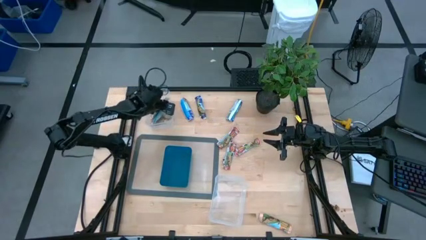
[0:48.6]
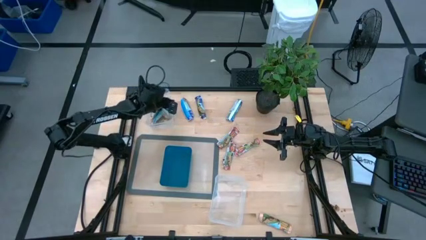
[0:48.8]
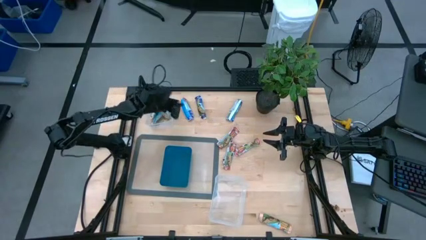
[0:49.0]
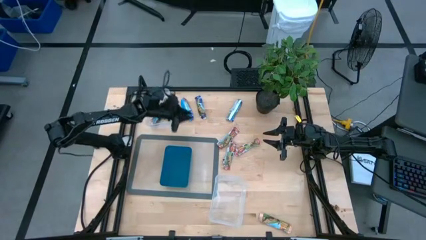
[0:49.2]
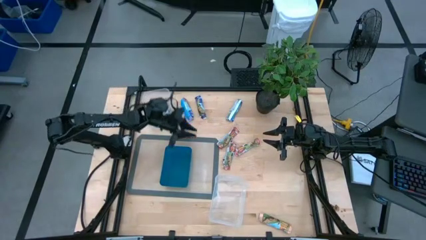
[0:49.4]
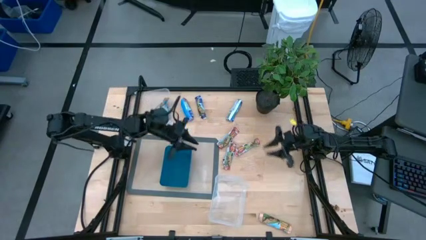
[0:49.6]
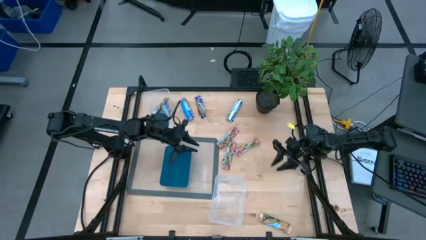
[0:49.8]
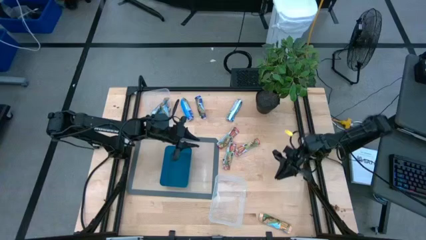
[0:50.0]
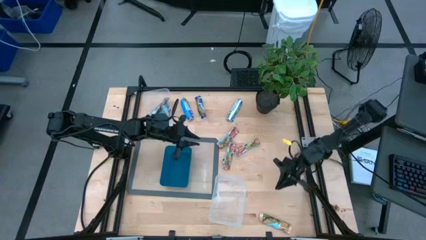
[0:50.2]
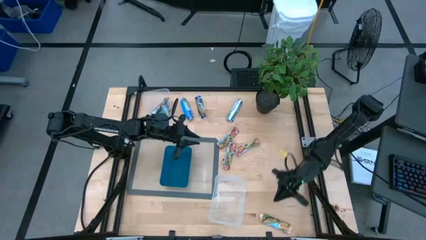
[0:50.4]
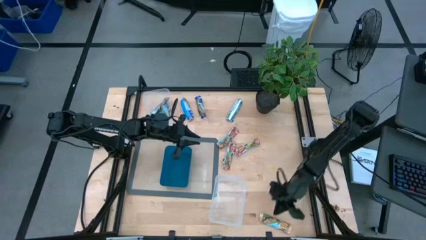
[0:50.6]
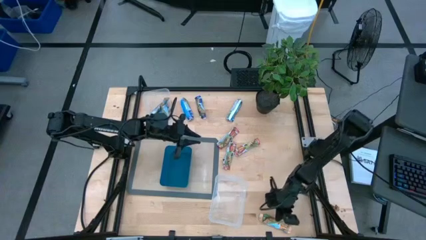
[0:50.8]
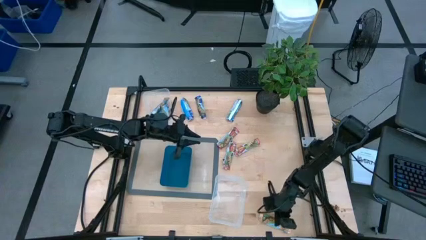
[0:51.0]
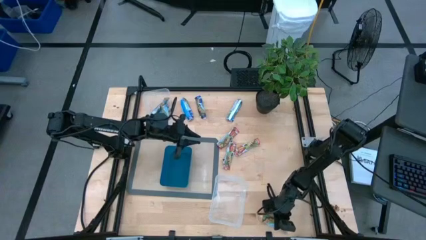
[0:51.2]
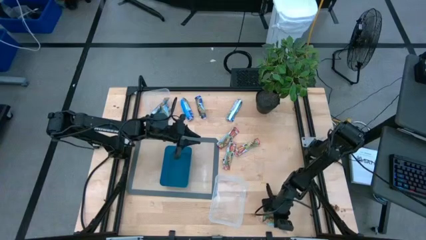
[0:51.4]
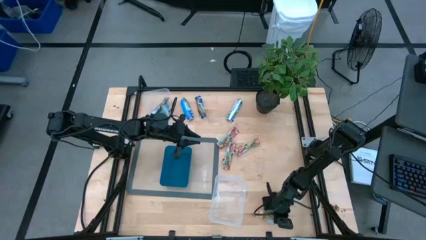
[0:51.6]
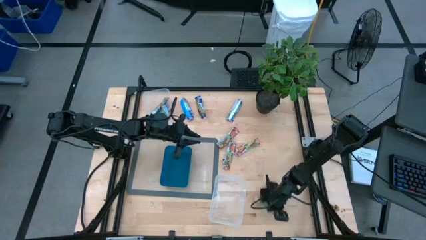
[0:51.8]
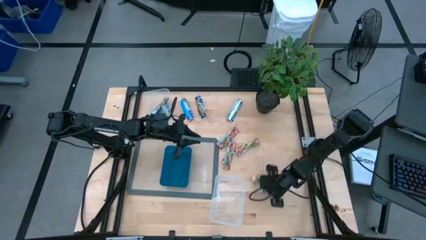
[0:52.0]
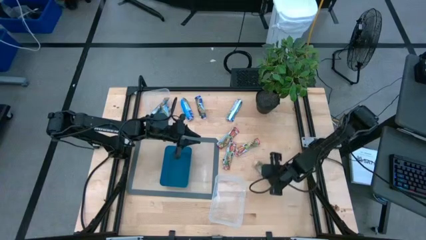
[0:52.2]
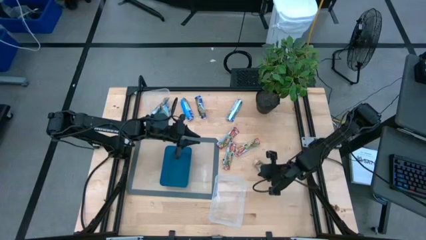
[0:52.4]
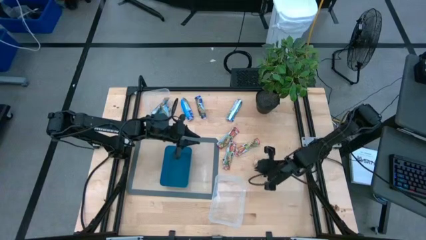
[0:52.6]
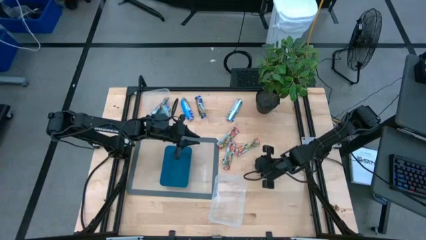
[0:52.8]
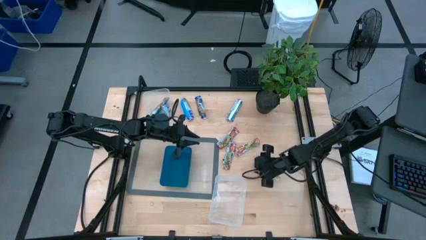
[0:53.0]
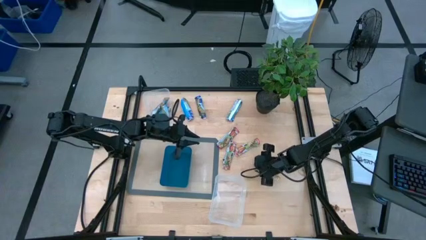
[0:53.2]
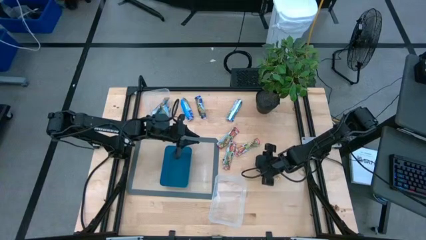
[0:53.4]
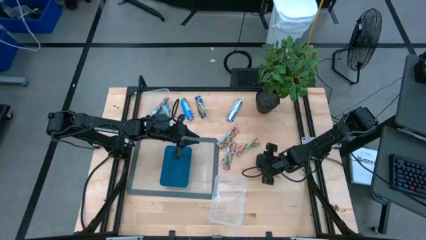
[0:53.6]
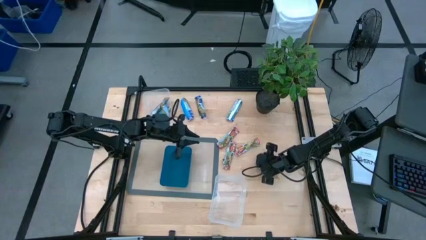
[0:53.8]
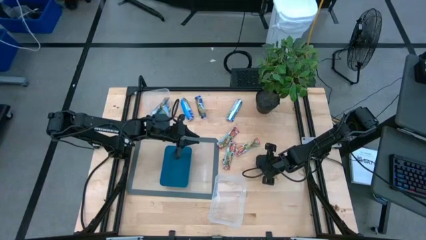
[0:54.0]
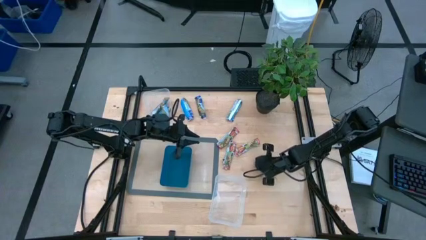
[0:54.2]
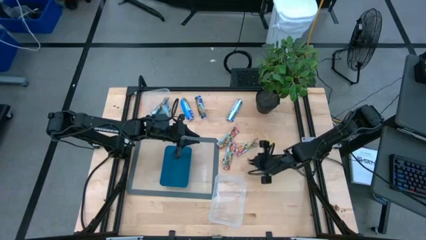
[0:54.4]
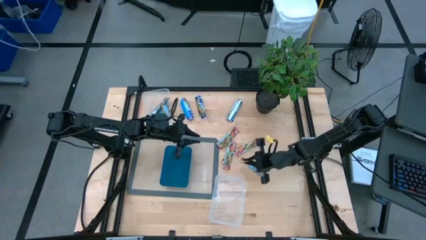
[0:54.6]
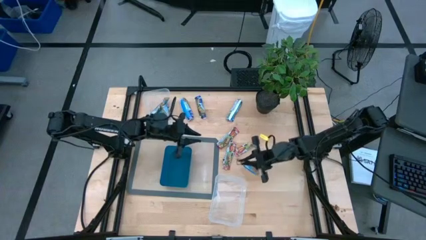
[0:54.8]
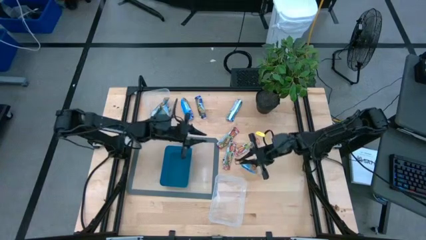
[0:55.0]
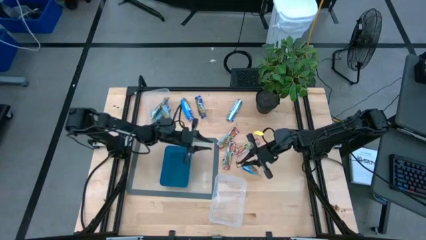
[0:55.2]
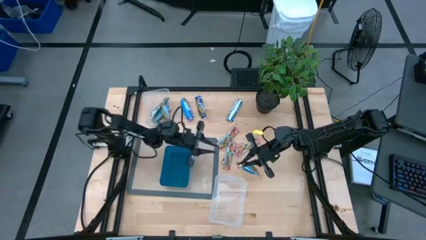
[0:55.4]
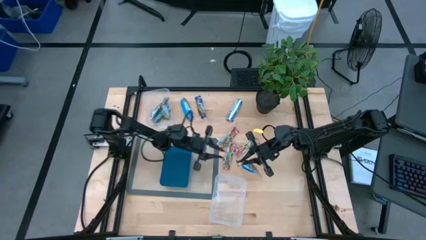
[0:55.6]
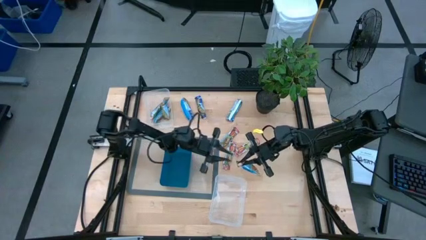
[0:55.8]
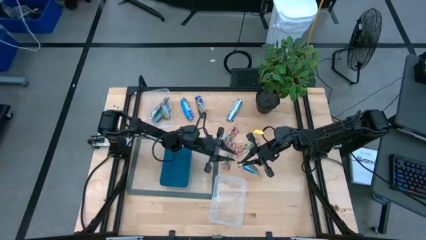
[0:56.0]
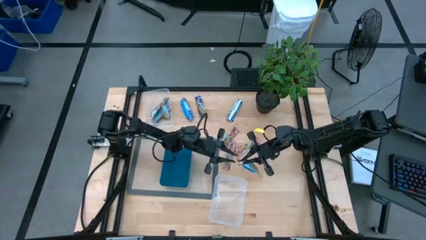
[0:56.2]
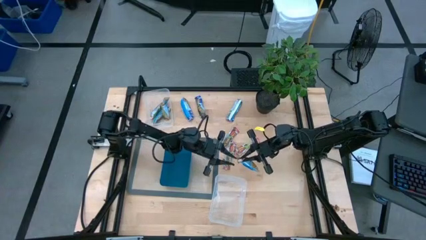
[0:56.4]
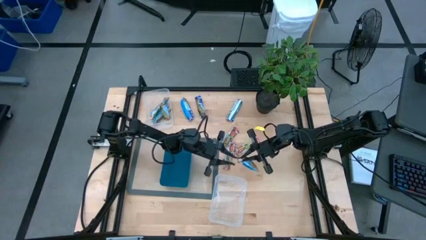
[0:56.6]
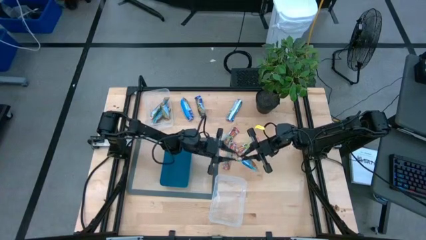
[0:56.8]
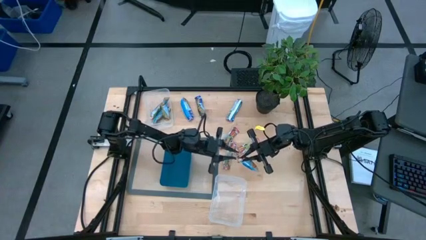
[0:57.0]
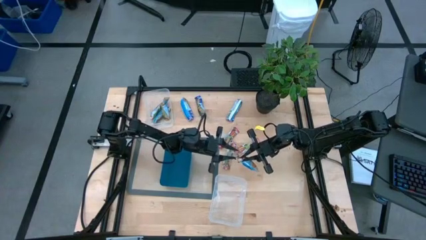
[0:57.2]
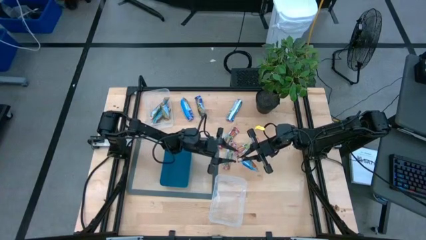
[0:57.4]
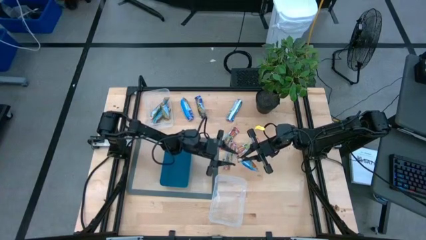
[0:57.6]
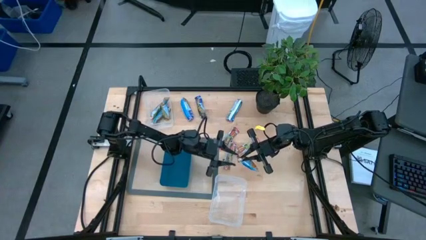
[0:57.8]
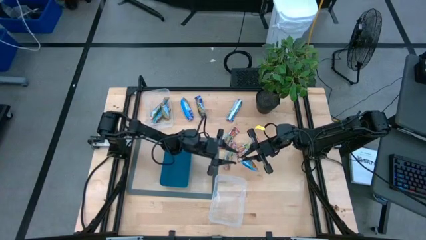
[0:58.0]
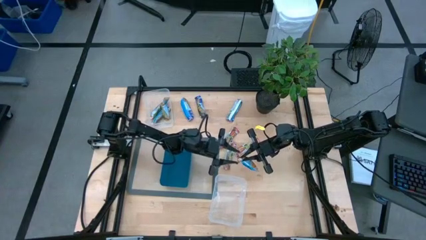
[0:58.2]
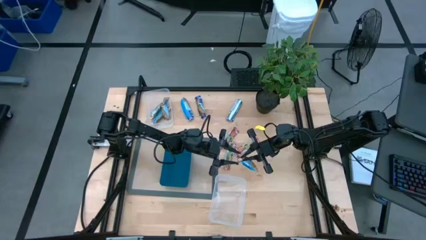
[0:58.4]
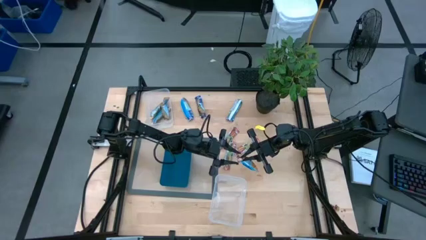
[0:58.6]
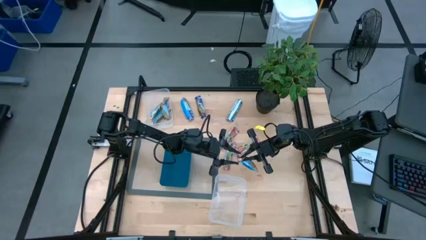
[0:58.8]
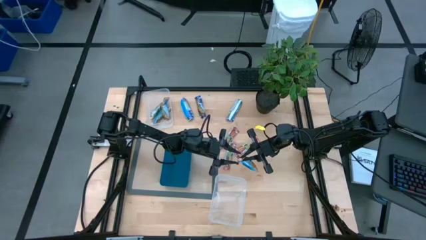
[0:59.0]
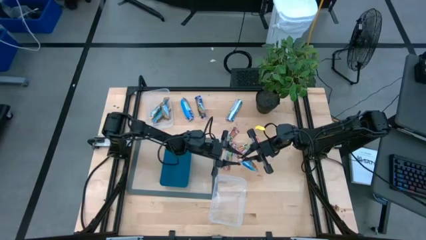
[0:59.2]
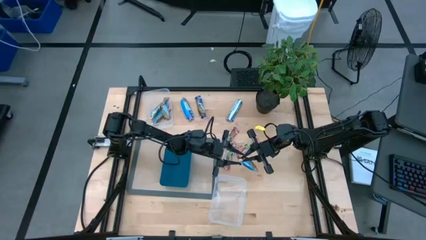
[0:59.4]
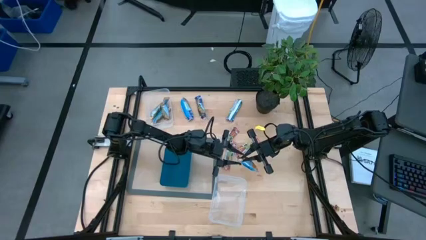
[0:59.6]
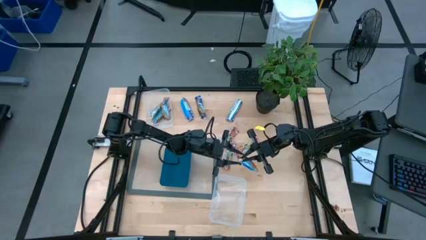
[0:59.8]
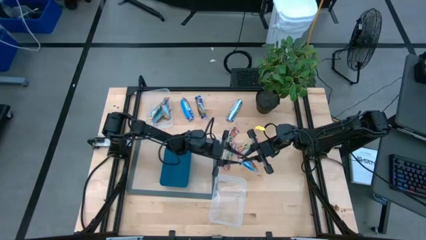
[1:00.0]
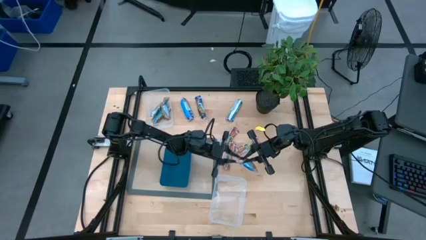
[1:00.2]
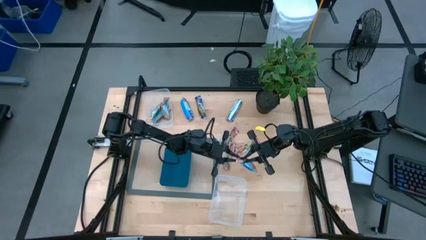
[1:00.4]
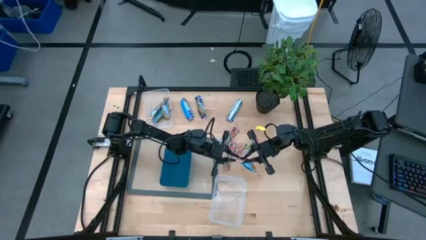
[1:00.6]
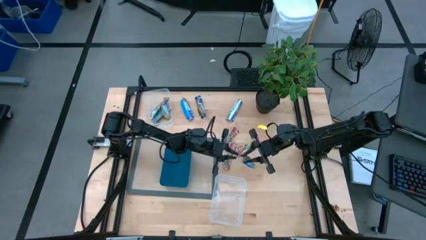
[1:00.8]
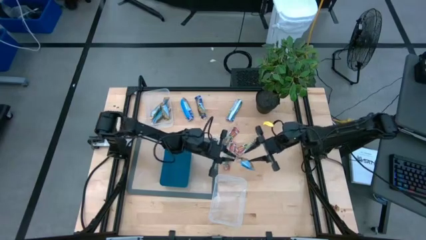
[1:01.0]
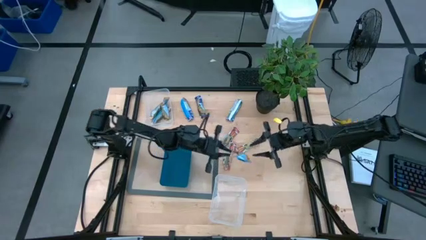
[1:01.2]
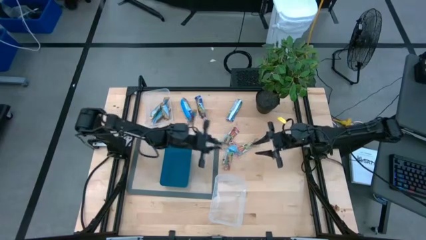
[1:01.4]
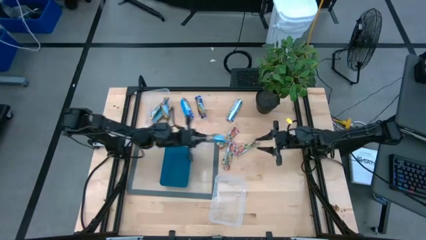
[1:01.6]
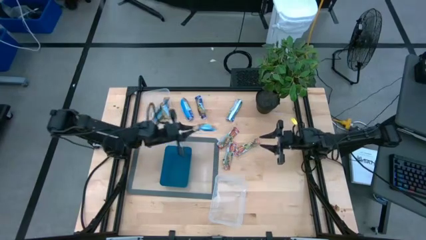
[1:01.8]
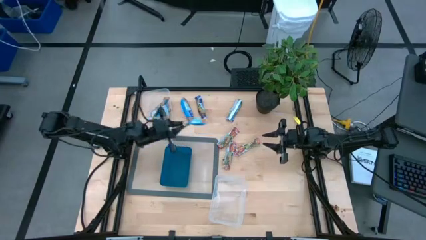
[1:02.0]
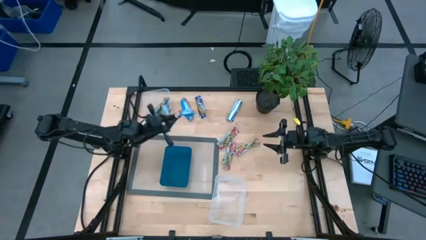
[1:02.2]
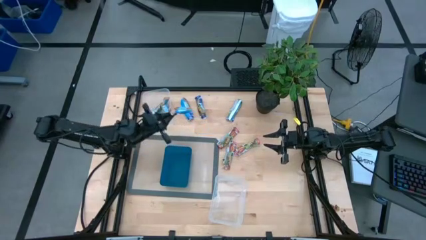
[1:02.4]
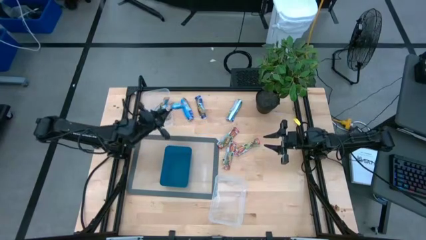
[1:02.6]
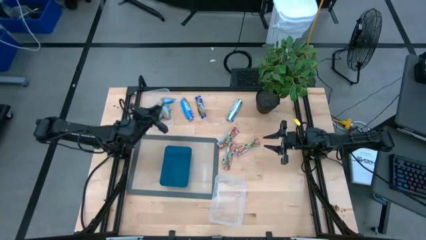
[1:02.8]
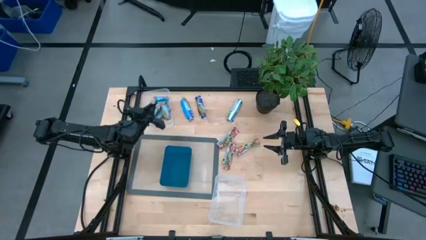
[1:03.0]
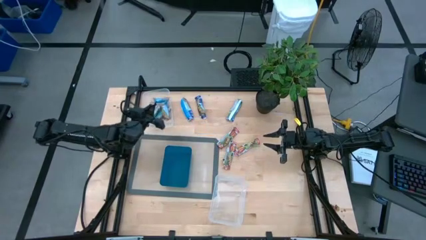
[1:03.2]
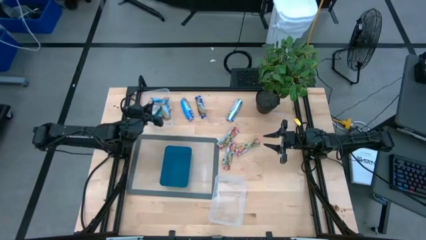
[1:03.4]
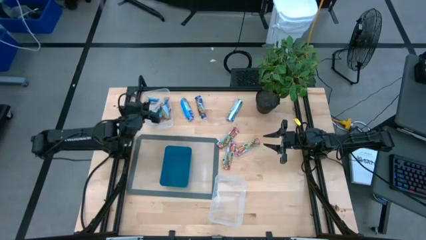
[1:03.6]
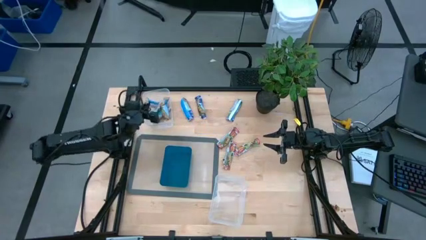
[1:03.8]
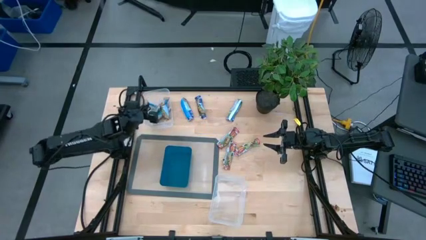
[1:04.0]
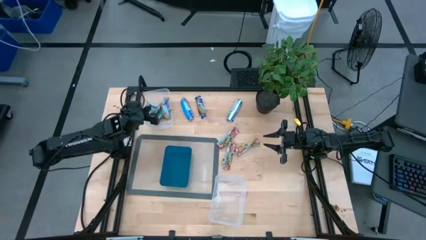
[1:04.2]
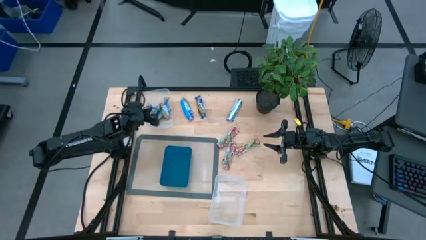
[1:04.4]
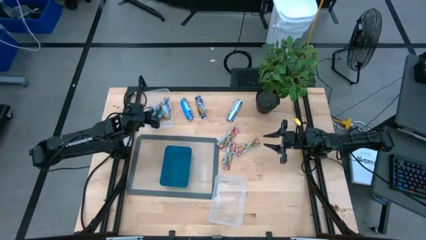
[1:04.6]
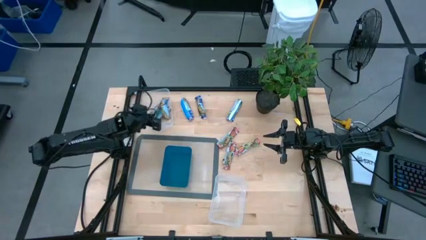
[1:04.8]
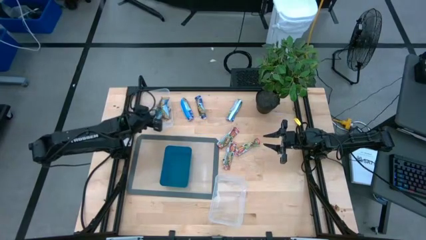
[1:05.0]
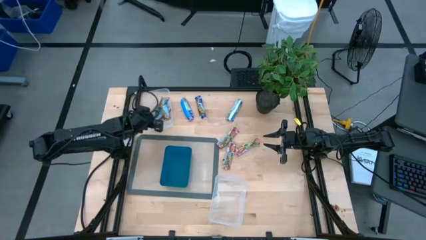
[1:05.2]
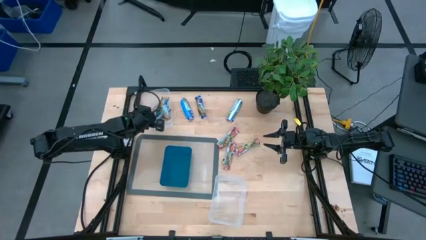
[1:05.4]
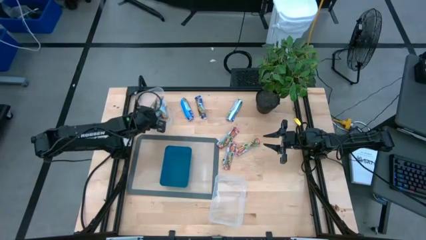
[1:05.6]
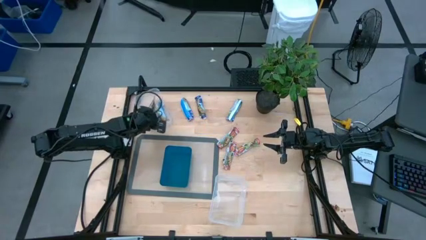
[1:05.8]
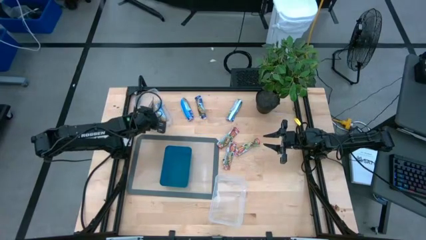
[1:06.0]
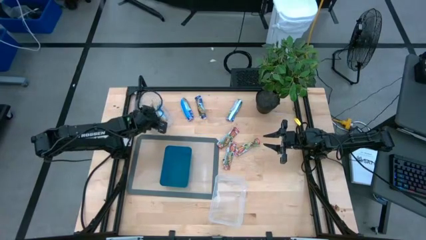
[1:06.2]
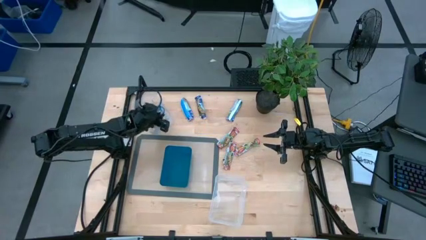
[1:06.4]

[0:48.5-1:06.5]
Task: Pick and place Granola Bars by type
Put the yellow granola bar into the top transparent bin
